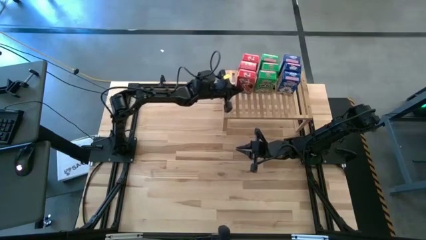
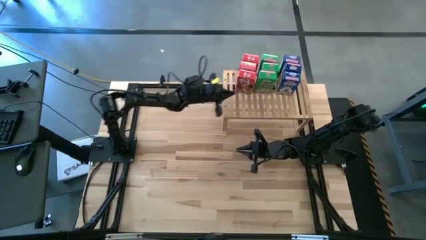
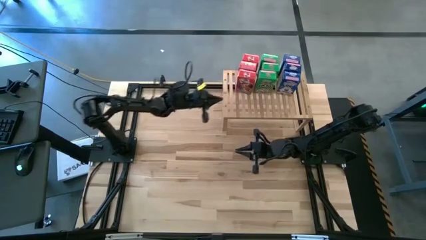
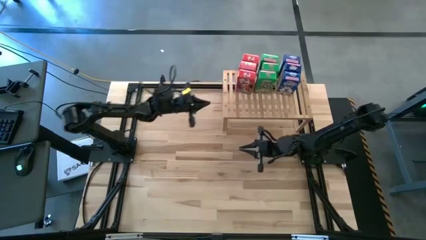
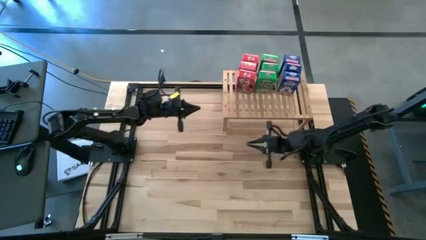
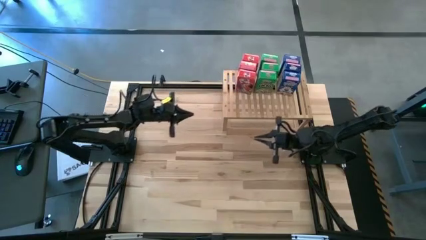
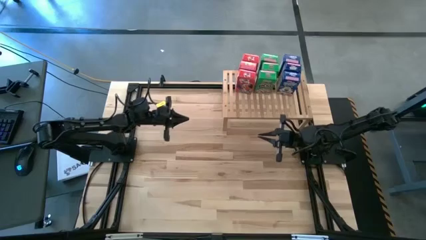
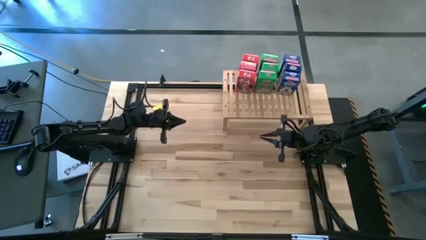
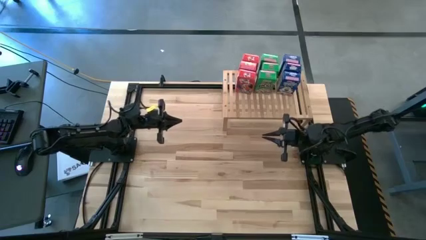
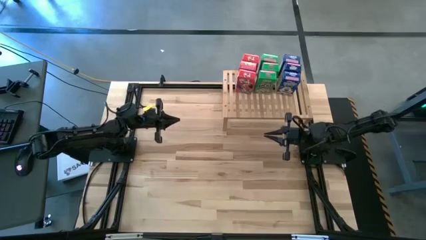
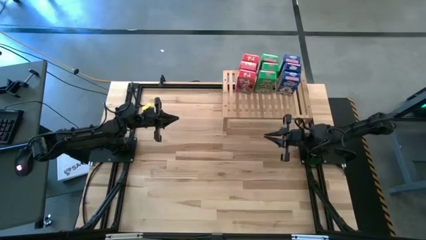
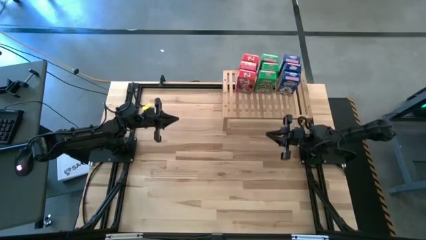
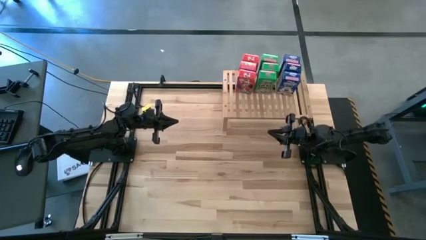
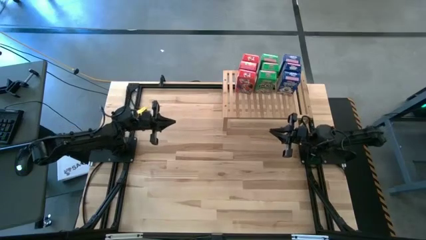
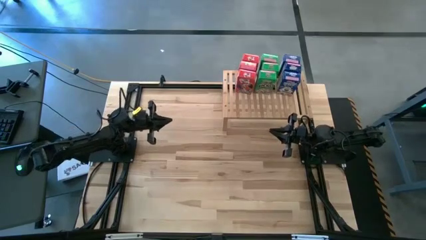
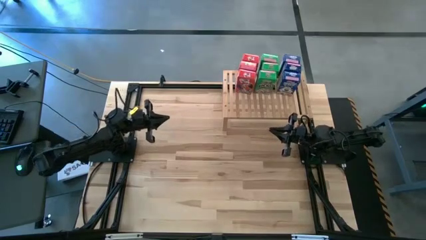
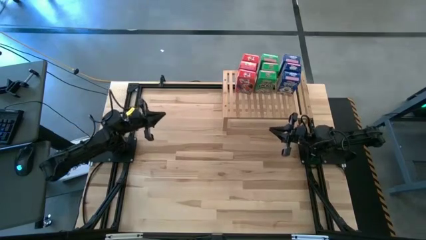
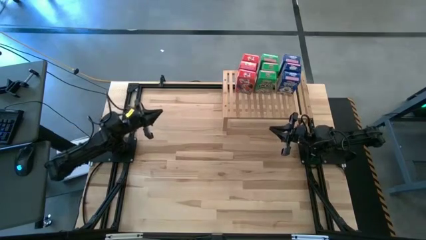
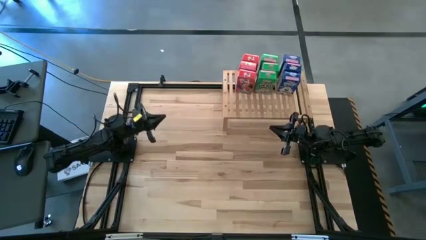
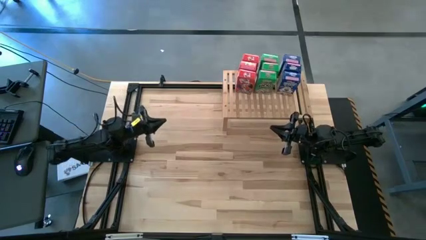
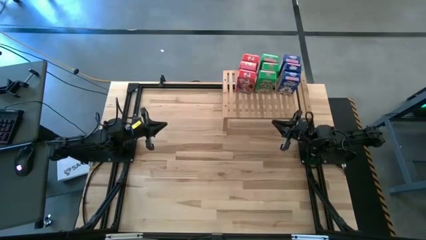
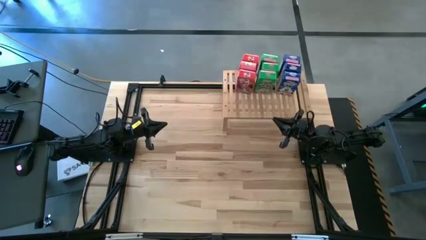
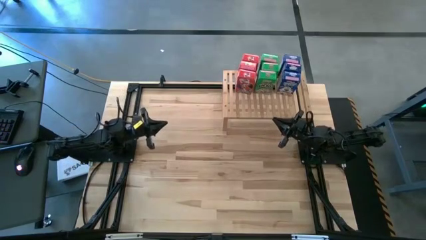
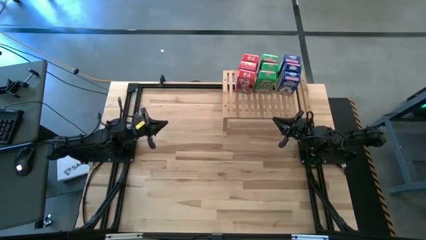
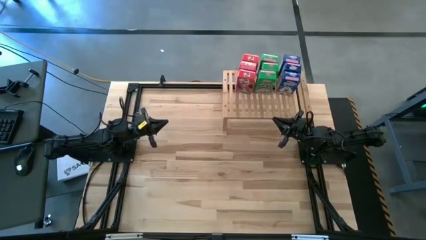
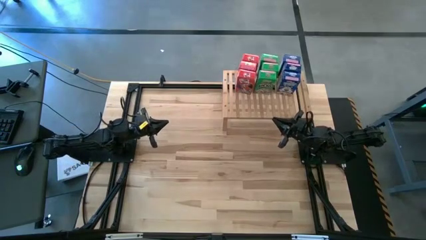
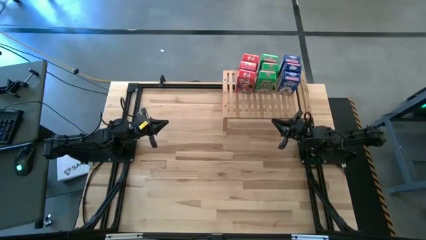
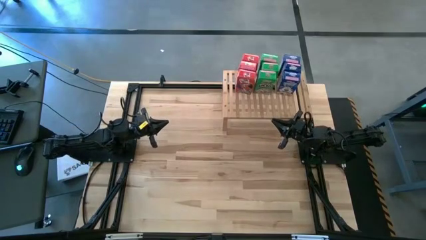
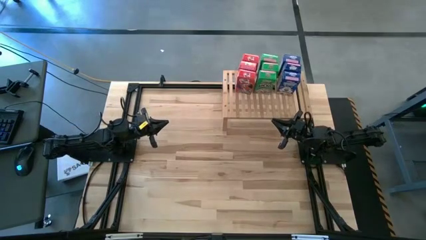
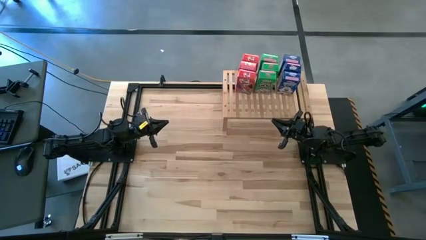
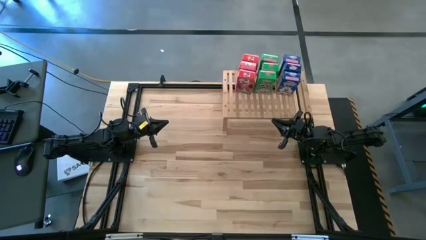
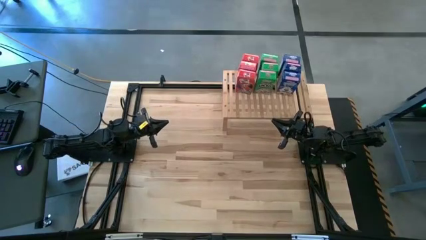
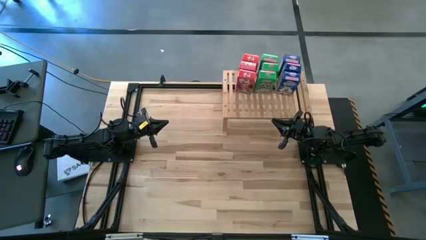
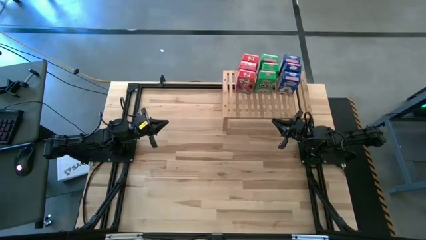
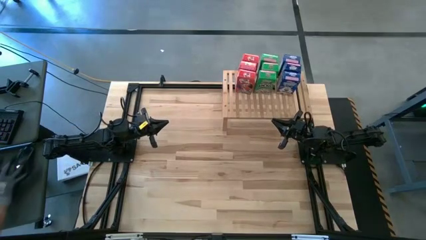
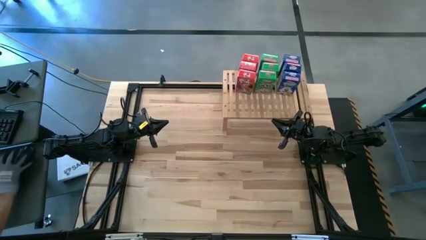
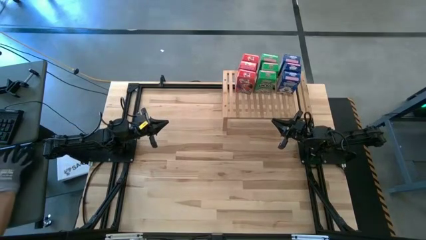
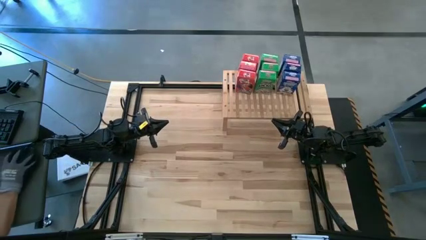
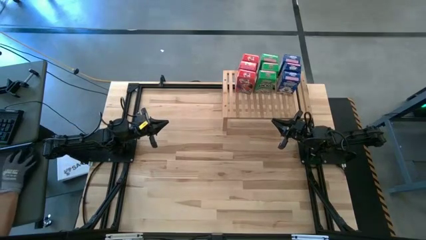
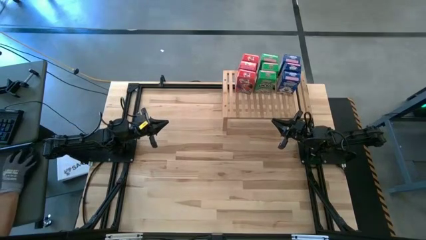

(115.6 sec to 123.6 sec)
Task: Stack cereal on shelf
Return to Home Position

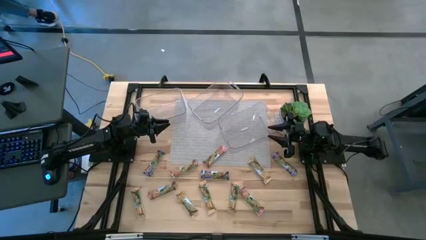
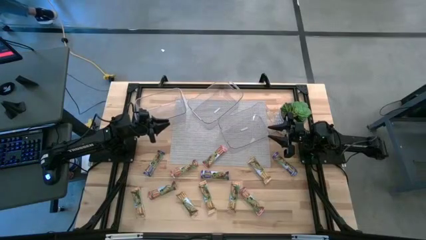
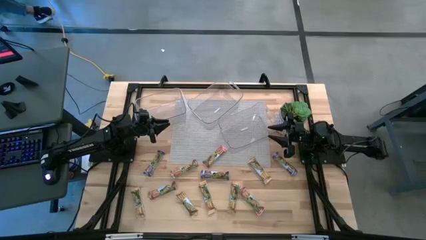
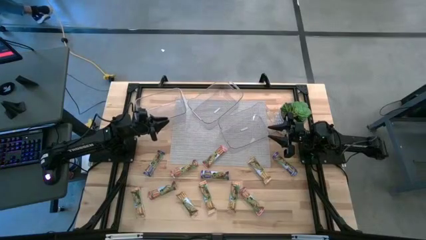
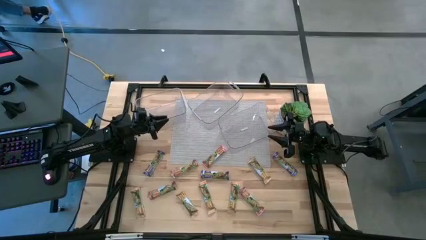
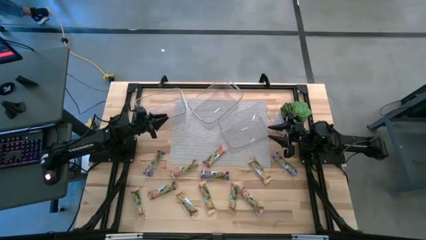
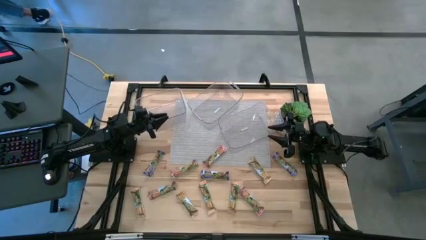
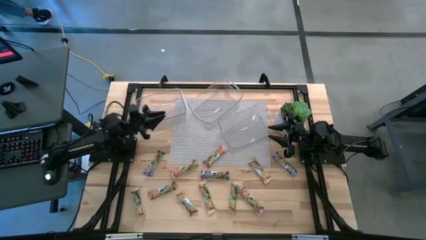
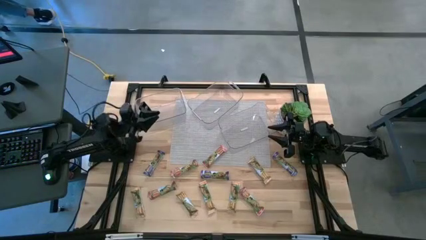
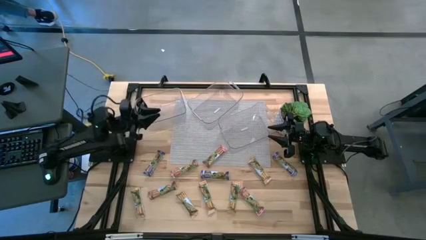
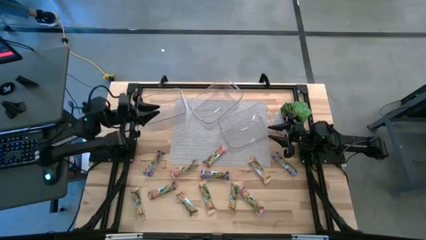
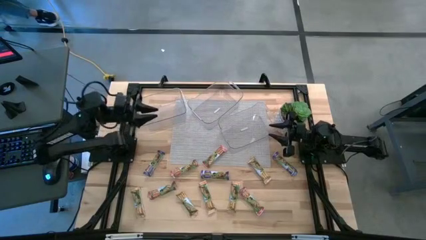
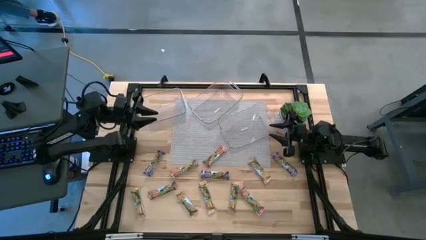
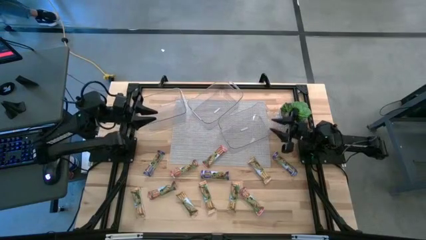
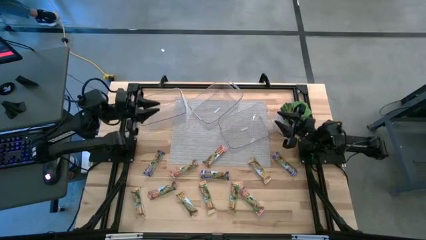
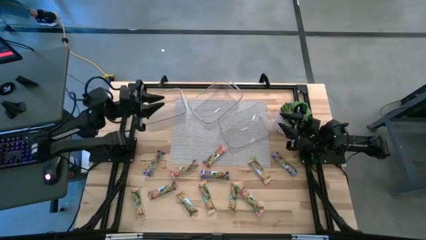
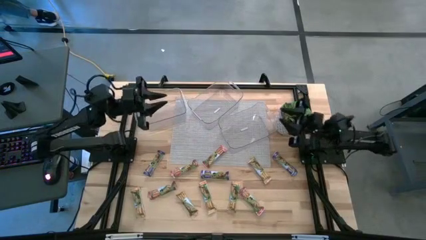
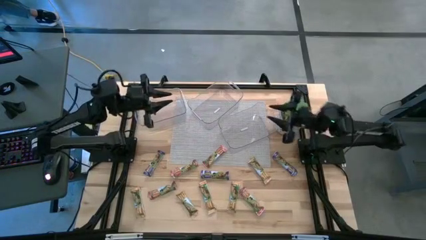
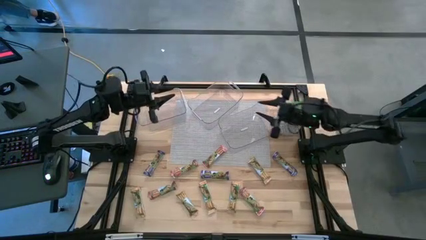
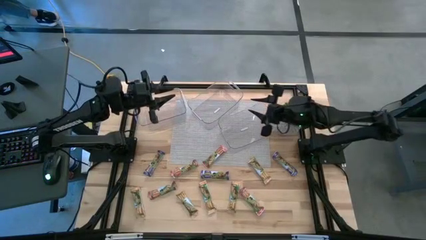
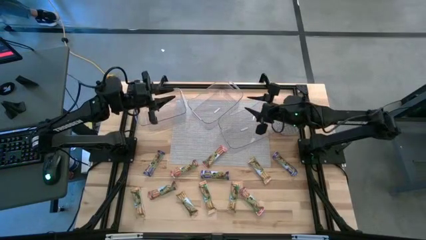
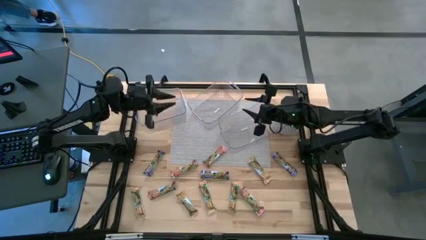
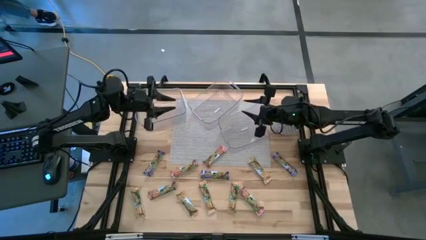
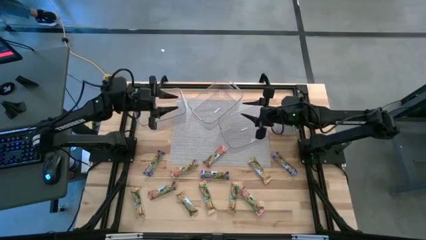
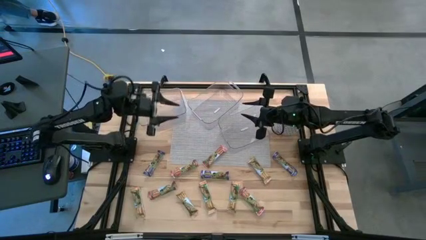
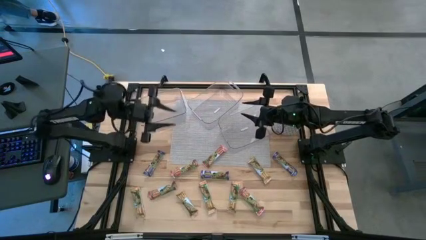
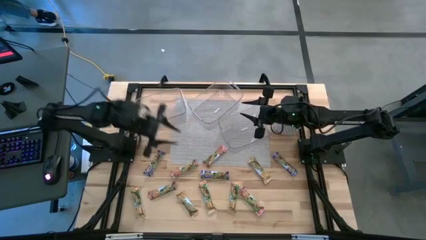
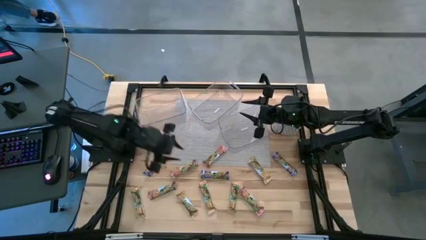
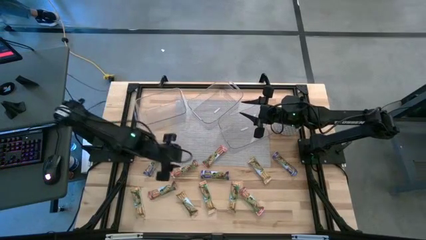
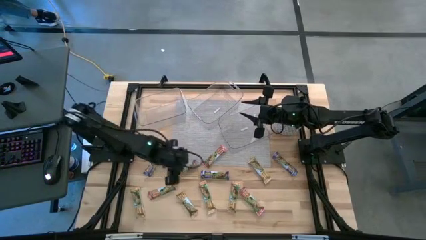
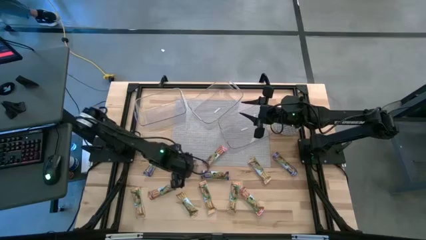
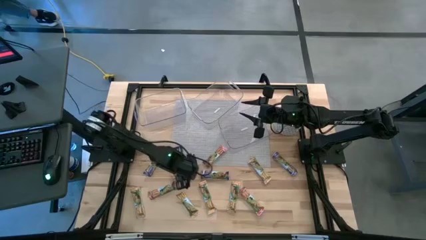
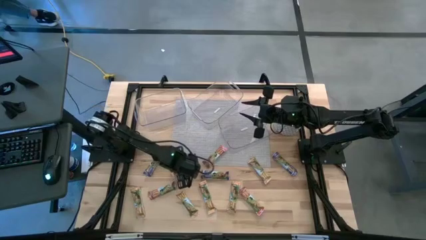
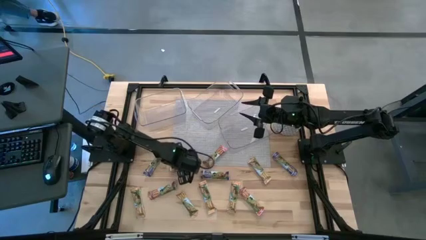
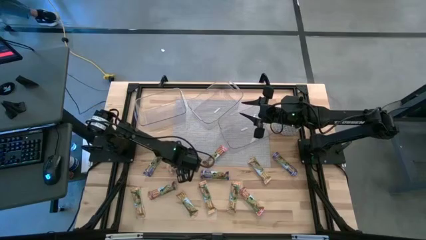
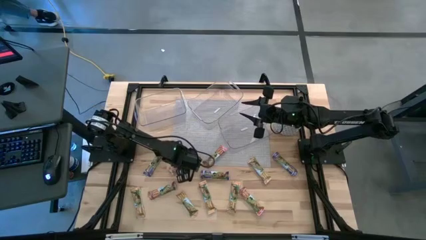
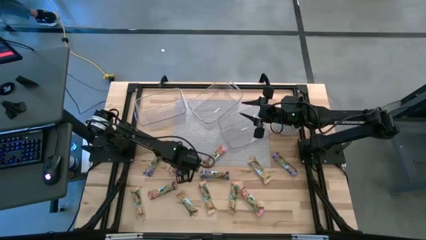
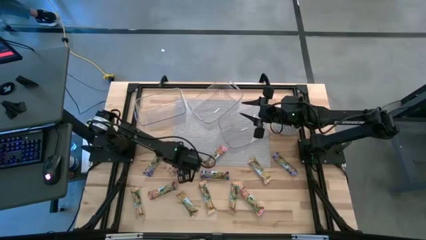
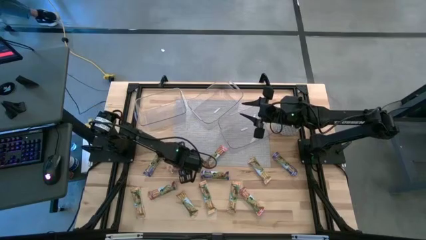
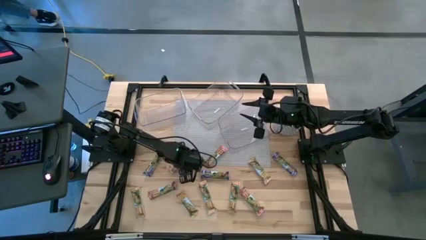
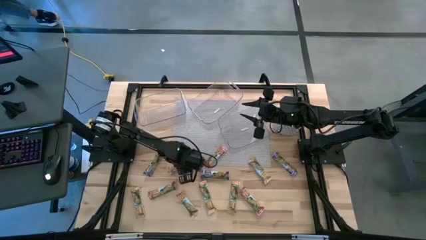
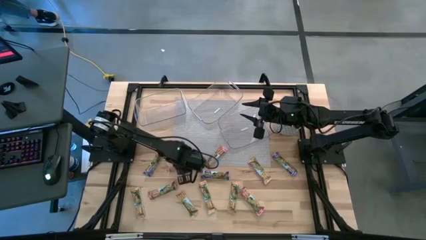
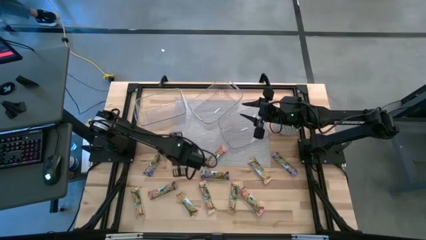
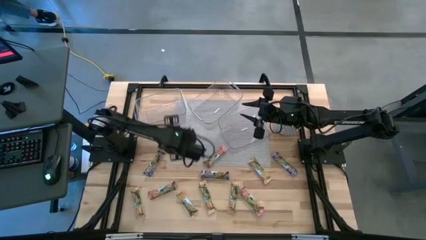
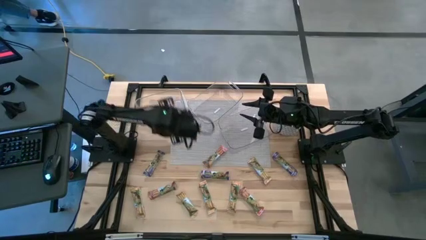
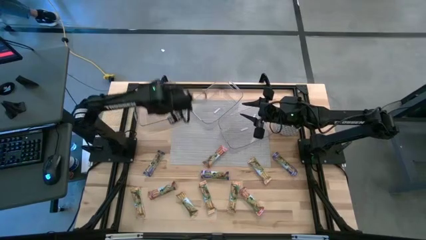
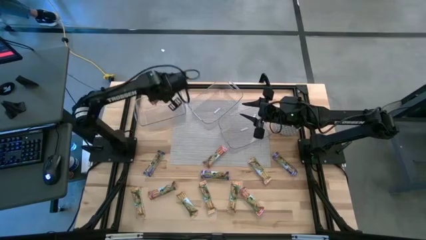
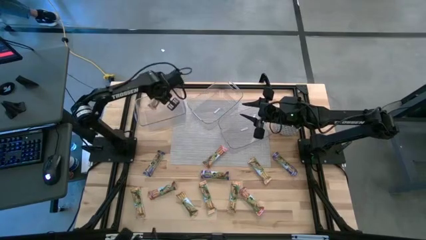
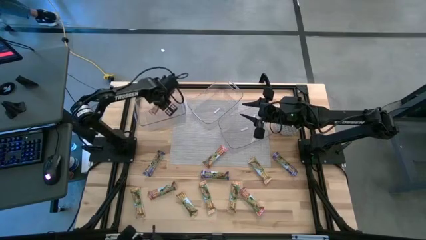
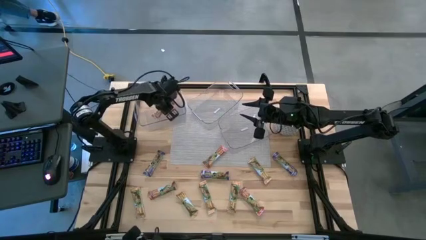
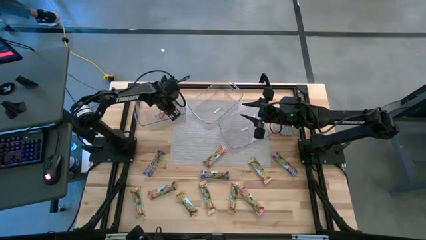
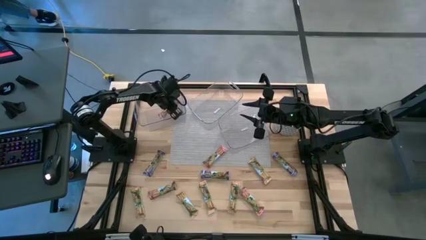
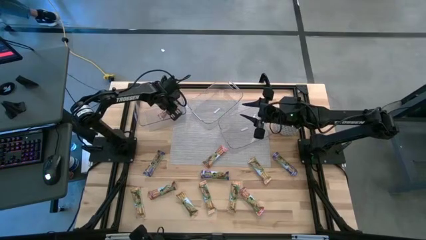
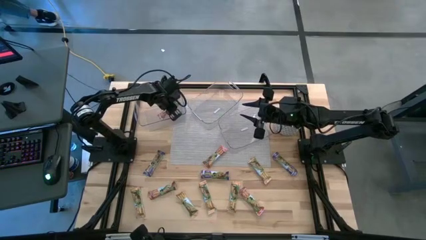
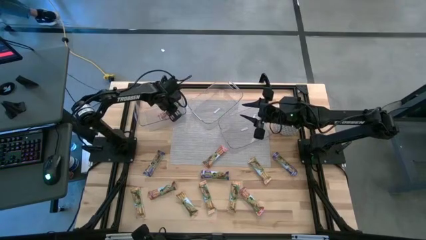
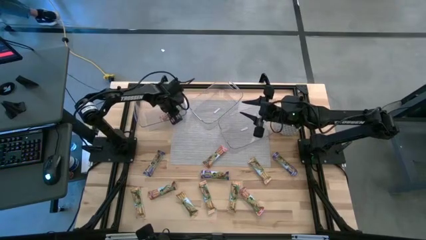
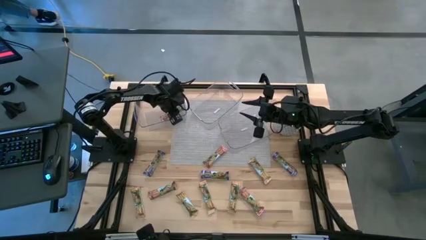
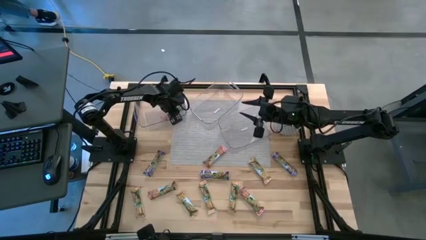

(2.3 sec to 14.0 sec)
Task: Pick and place Granola Bars by type
Put the red granola bar into the left transparent bin
